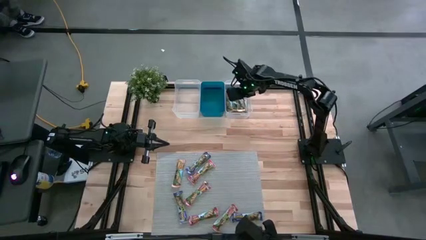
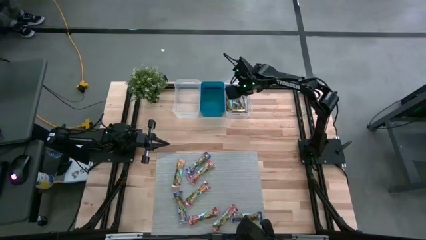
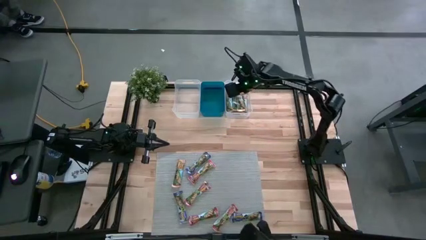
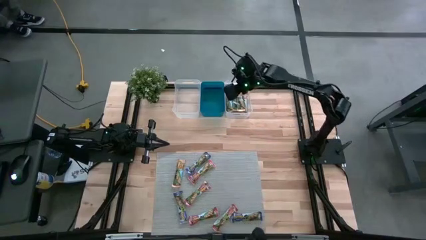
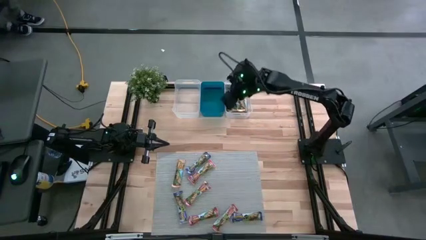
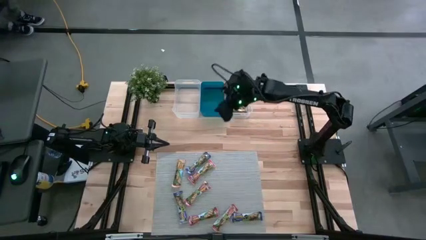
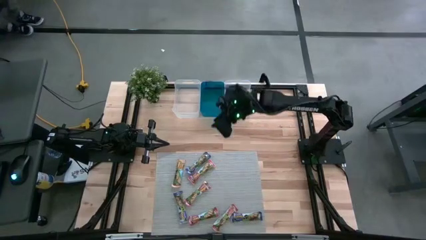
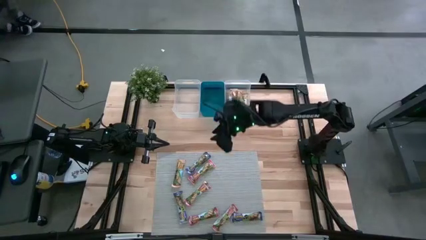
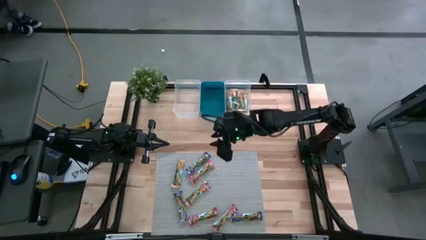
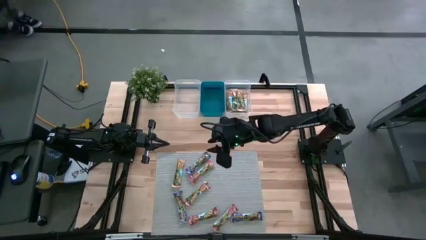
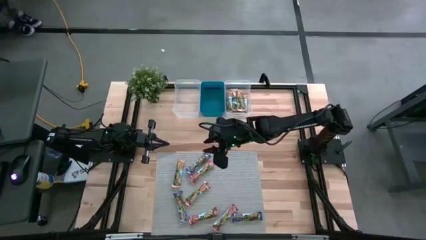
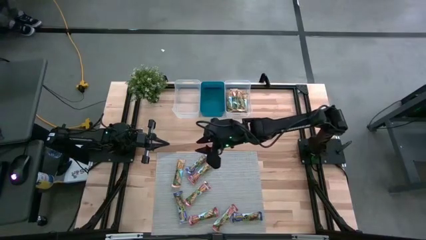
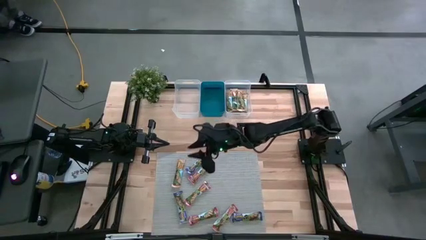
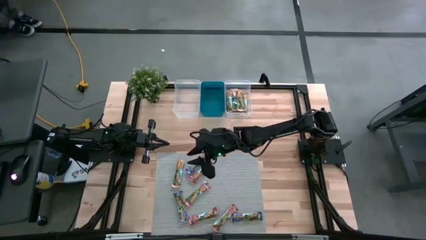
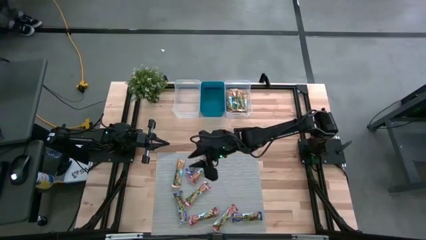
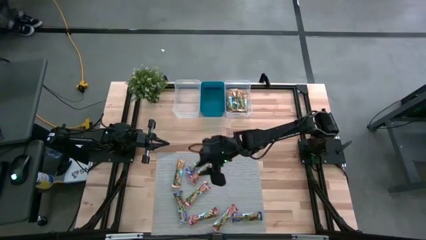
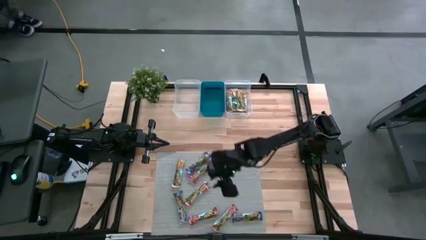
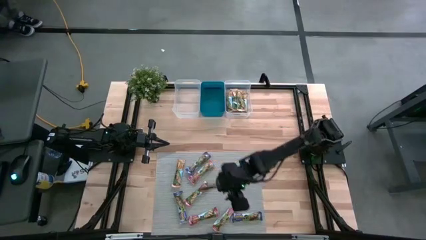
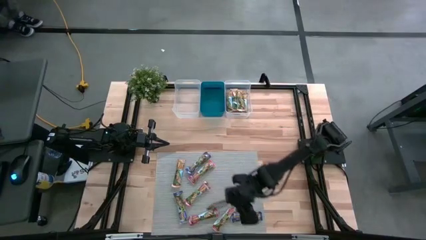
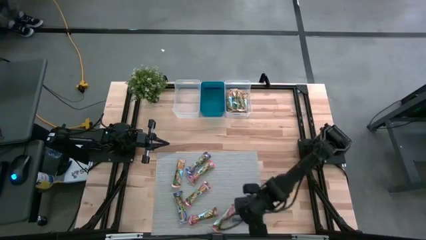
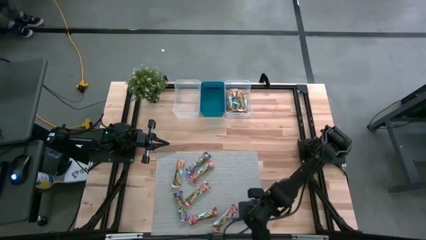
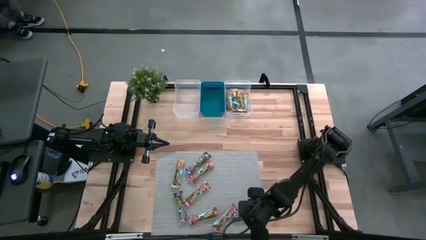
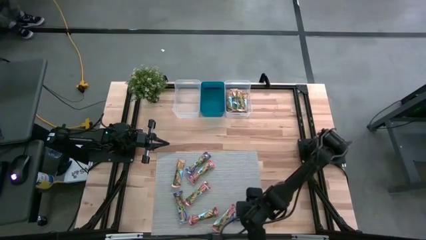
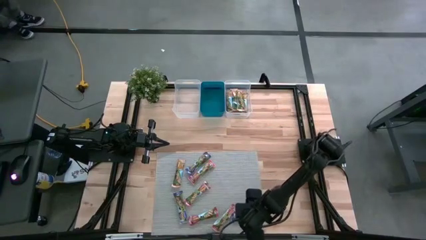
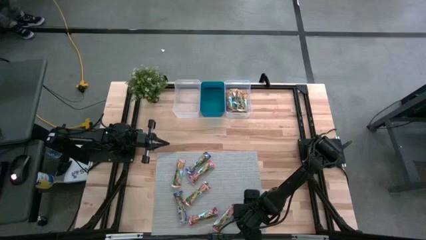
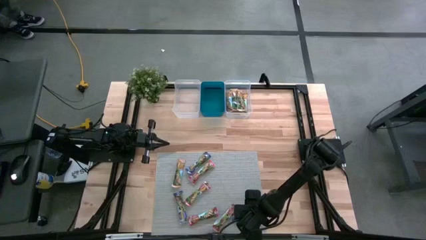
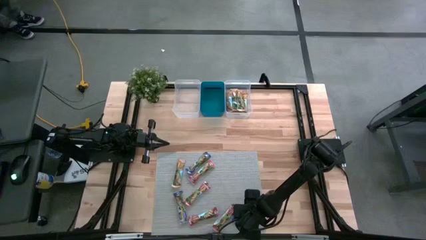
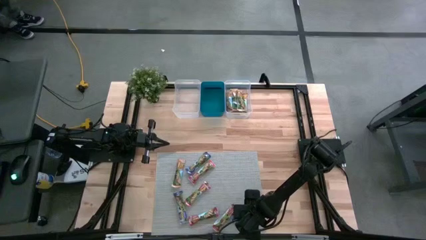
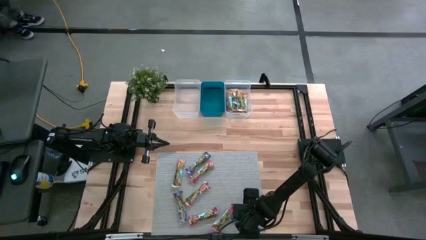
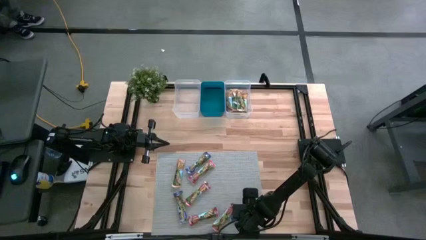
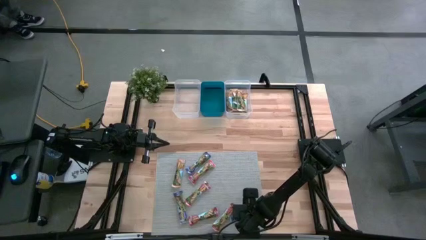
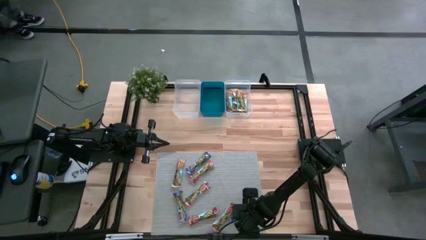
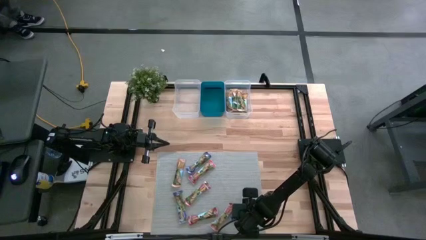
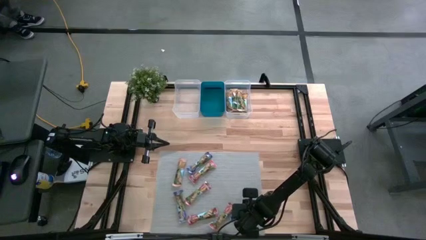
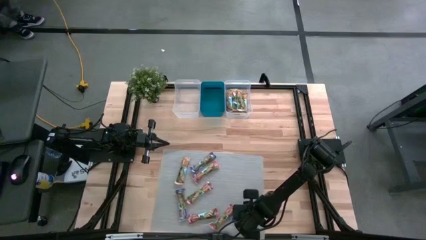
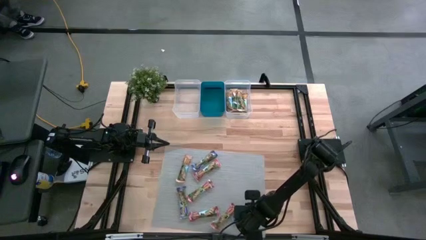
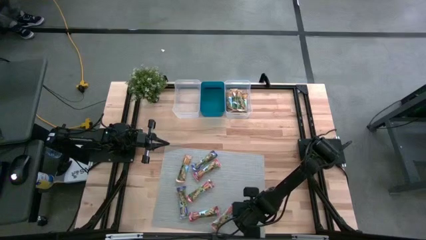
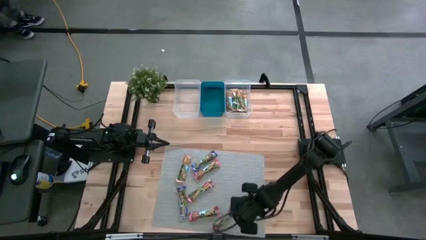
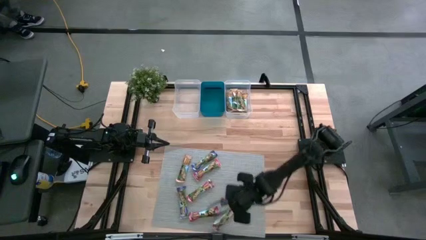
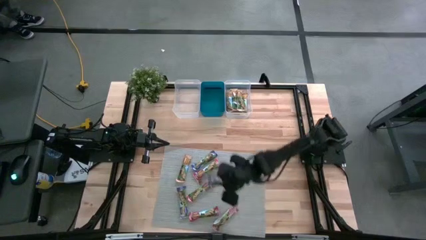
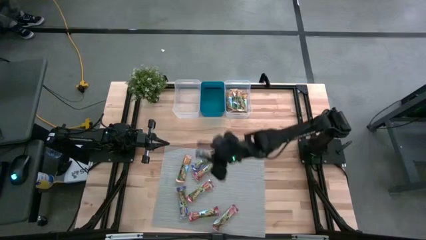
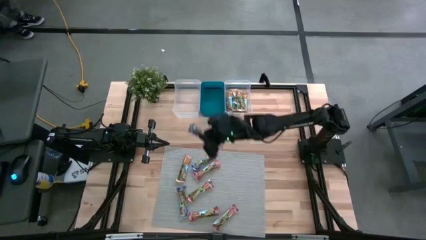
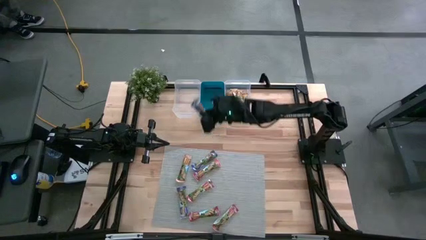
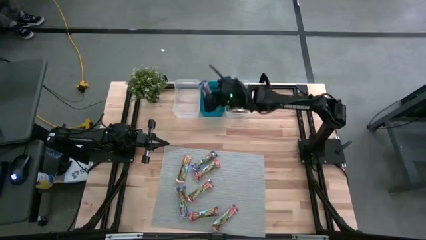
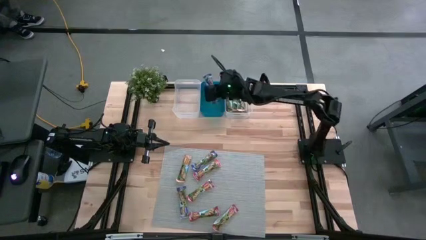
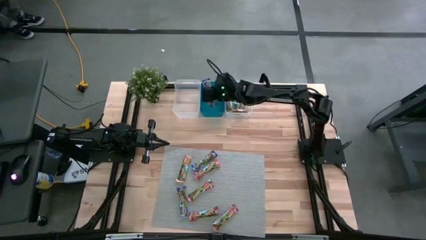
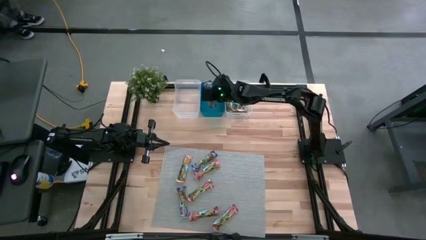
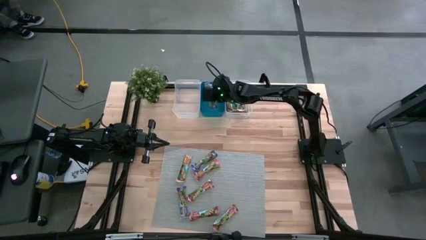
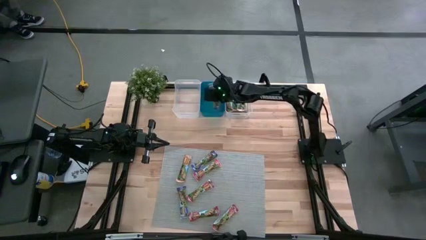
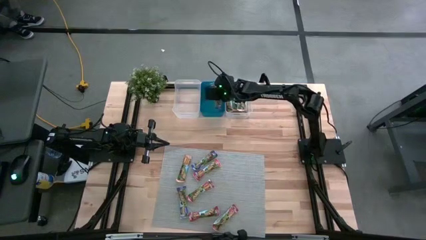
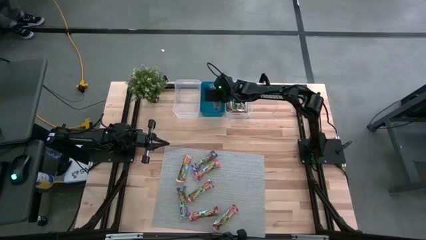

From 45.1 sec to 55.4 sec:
Task: Pick and place Granola Bars by type
Put the blue granola bar into the blue bin

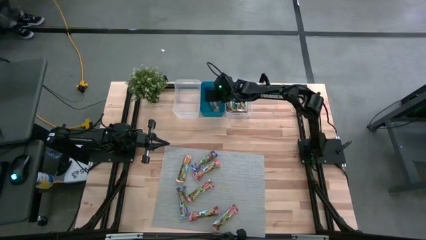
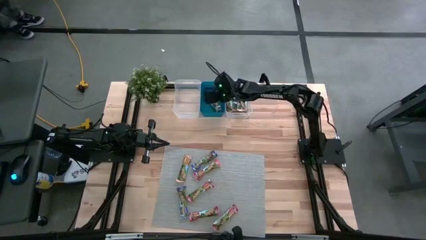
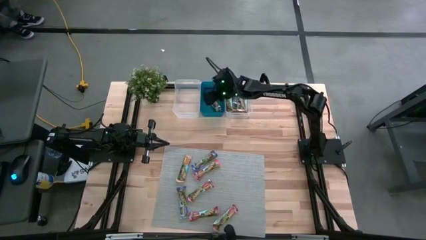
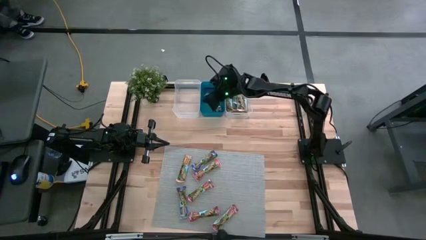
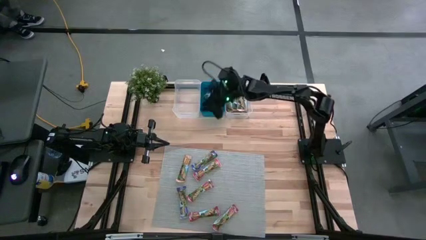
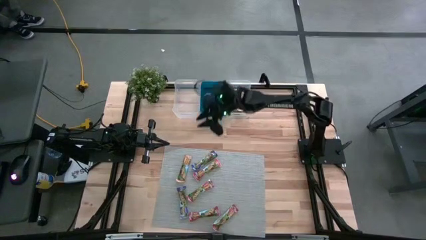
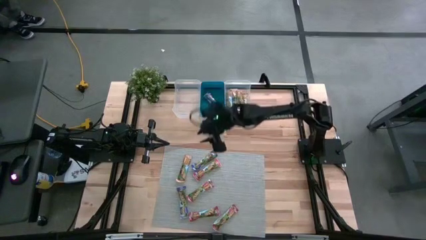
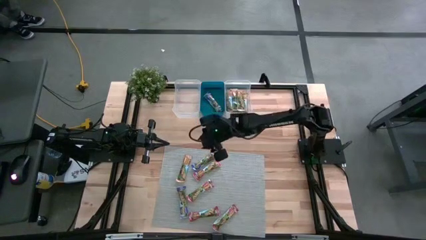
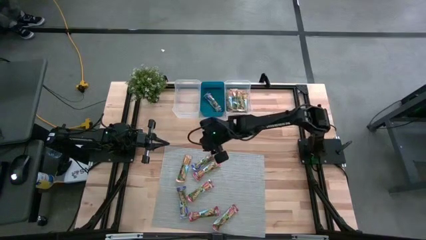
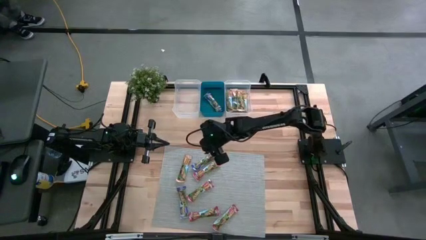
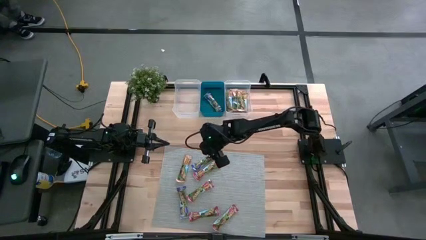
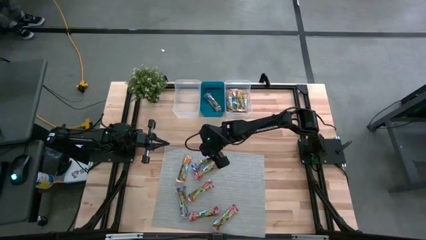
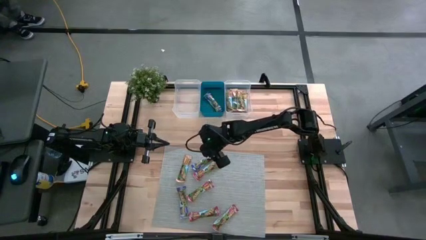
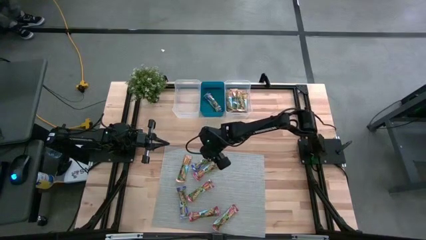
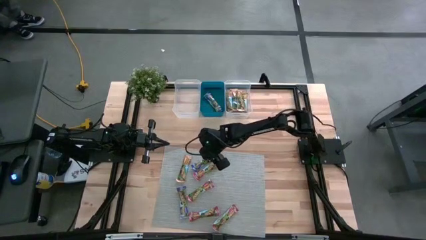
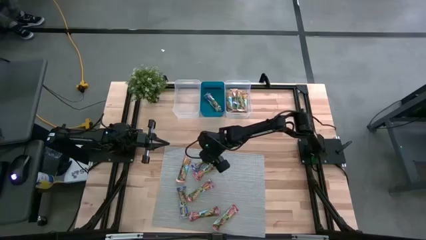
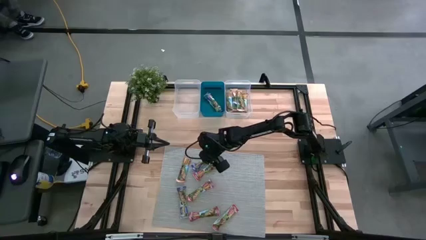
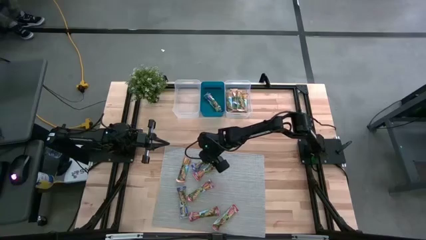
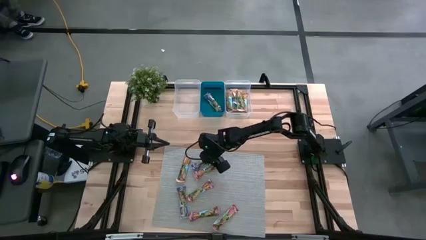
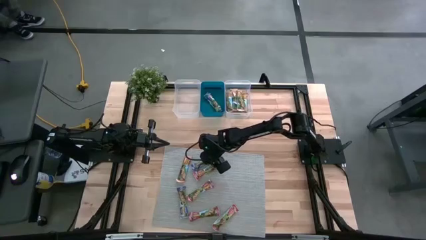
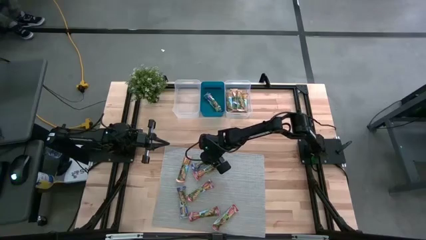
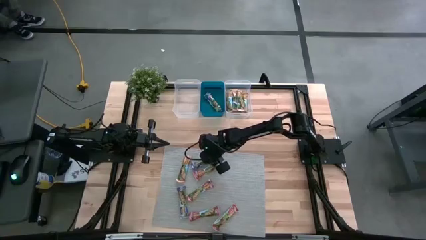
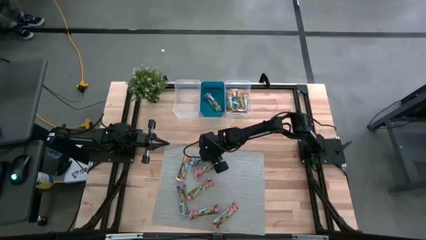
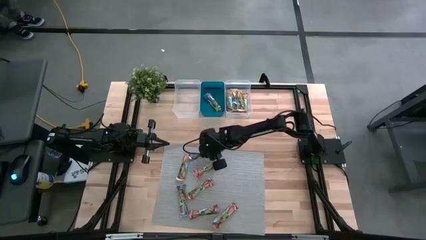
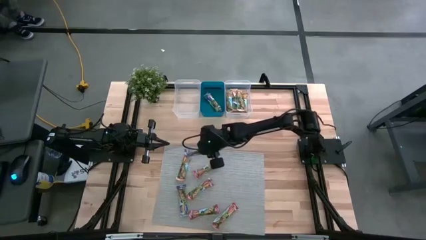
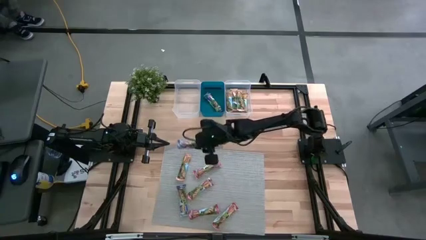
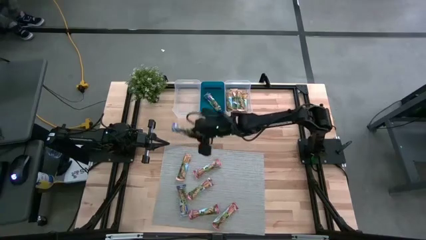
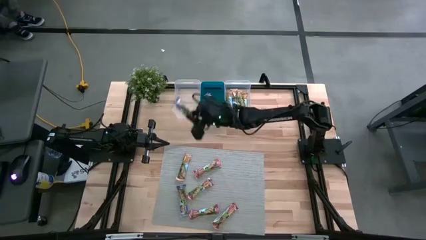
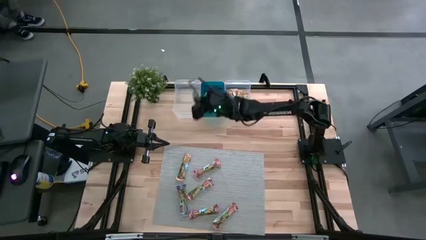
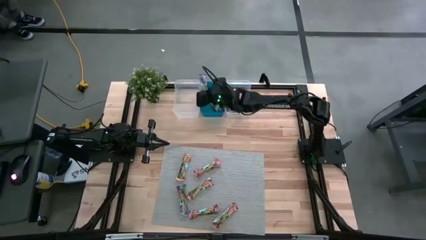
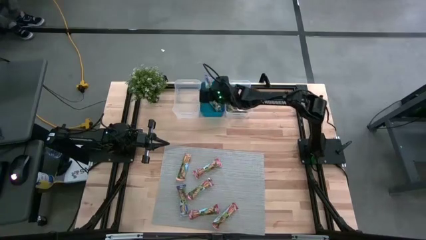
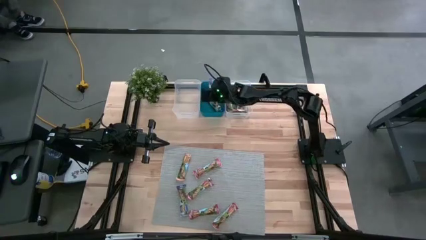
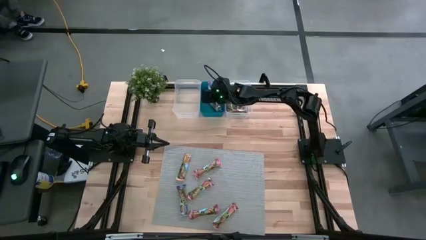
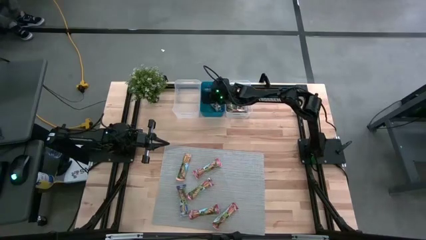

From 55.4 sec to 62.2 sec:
Put the blue granola bar into the blue bin
